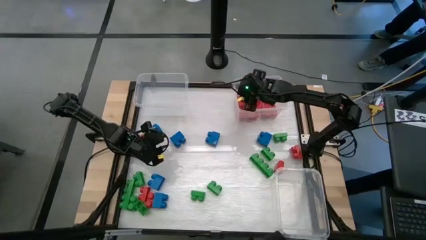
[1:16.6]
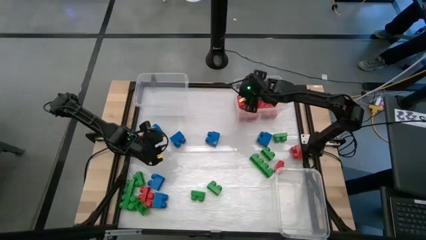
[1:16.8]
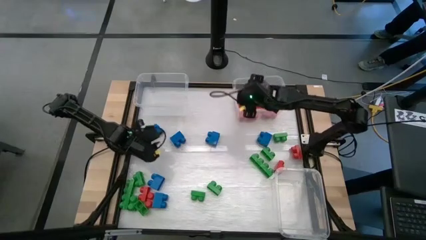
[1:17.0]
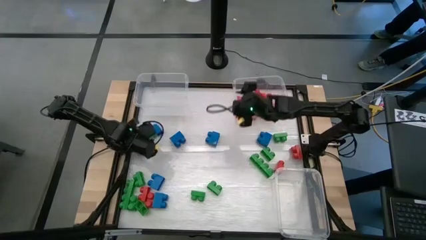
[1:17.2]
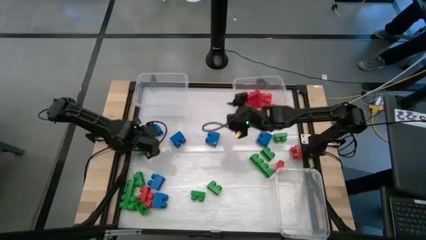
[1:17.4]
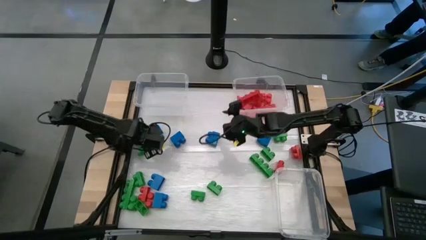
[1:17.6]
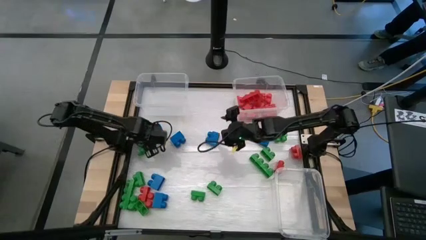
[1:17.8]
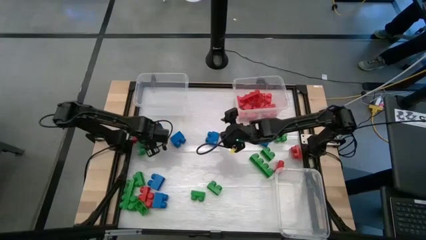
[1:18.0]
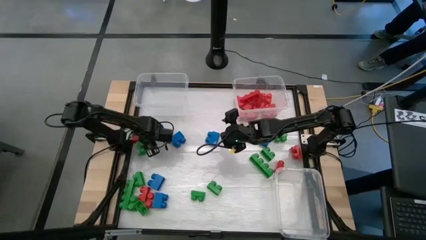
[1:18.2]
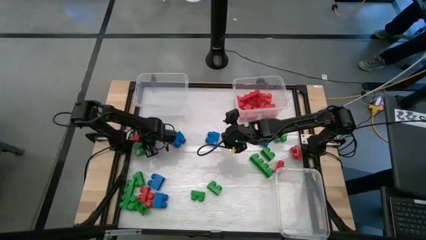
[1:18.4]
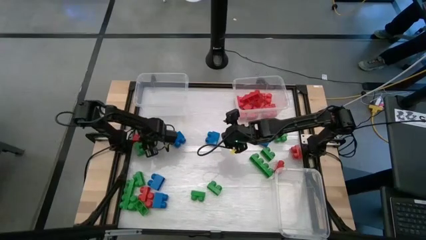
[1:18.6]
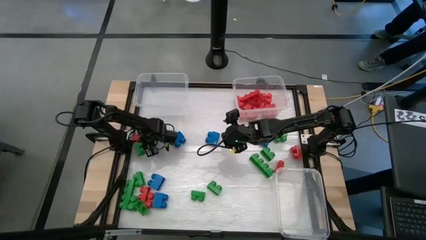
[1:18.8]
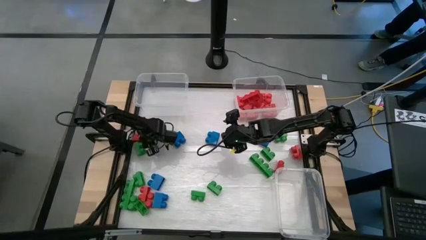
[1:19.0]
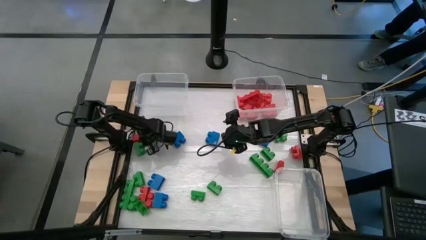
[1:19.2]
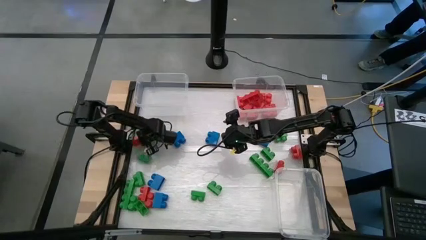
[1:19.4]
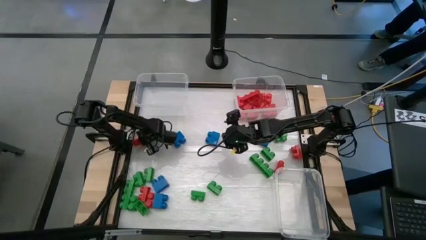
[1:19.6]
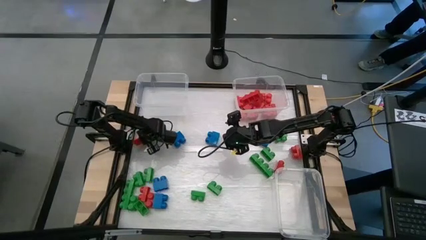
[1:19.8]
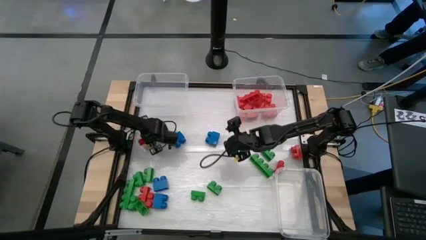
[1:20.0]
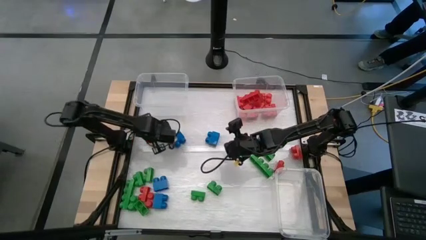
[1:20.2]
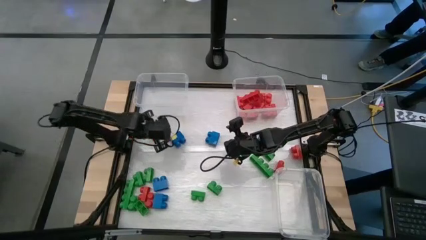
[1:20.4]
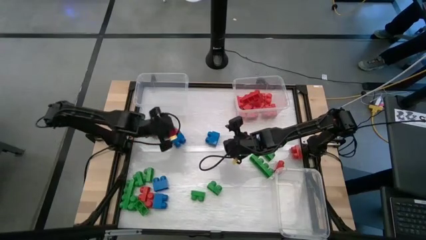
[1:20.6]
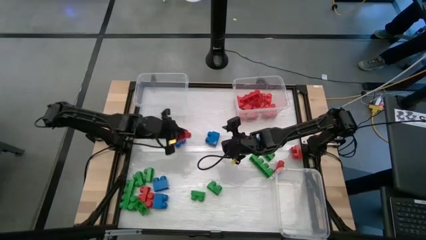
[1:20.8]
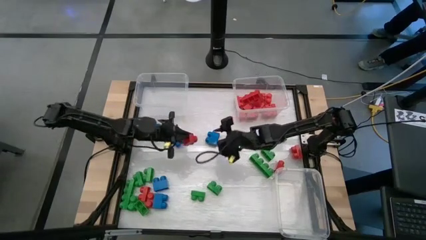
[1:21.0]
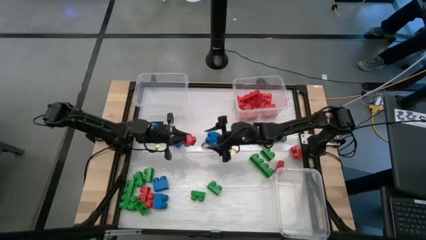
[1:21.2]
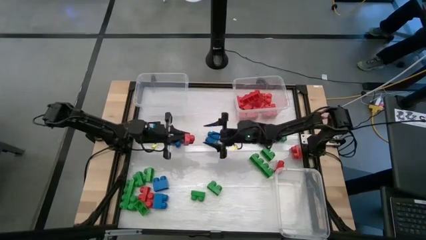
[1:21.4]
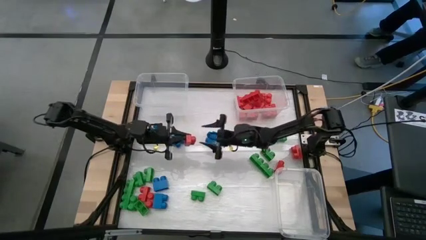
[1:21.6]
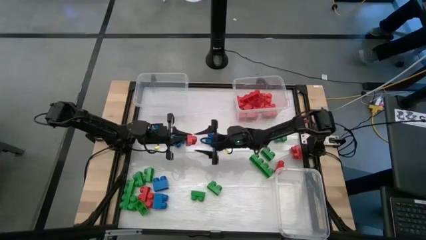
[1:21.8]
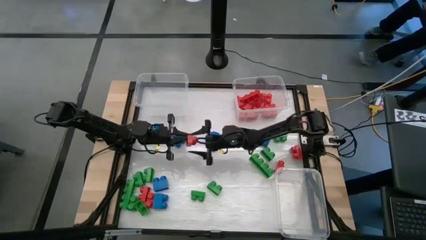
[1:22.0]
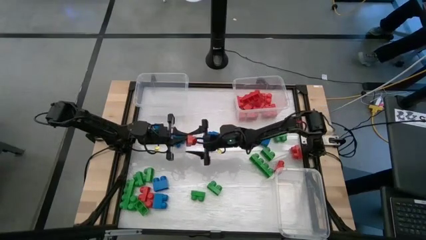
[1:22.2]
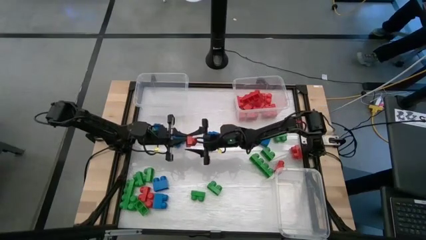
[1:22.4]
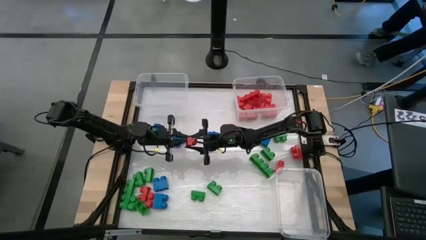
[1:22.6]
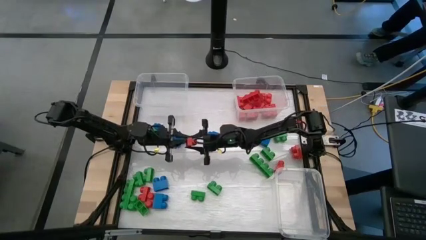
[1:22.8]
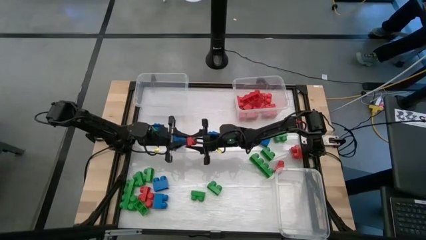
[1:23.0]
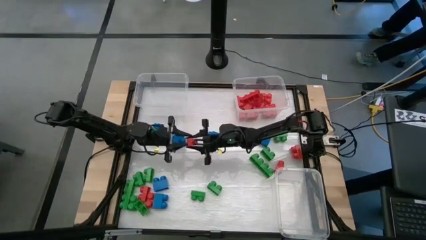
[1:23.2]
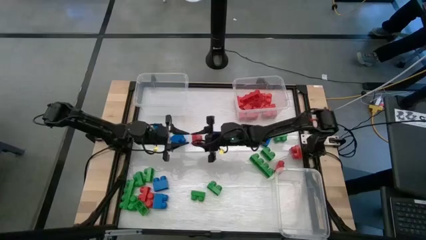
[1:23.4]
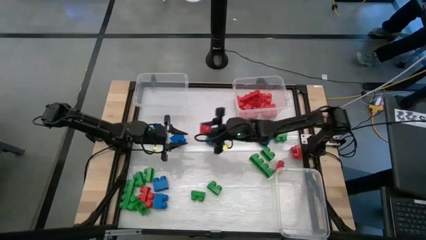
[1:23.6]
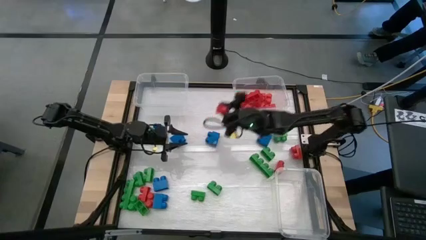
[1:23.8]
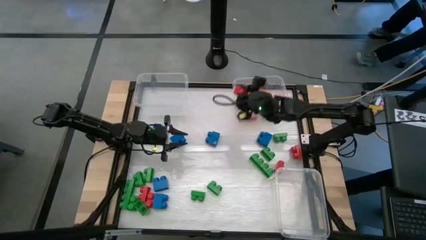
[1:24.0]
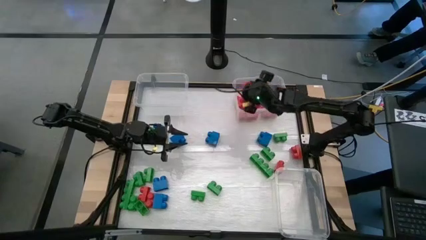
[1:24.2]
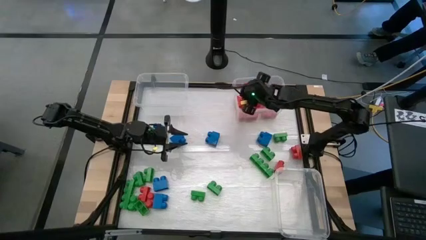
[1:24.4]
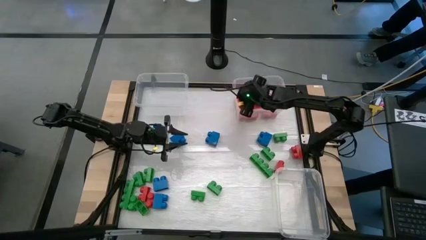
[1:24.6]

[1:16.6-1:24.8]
Task: Sort blocks
Put the red game piece into the top right transparent bin

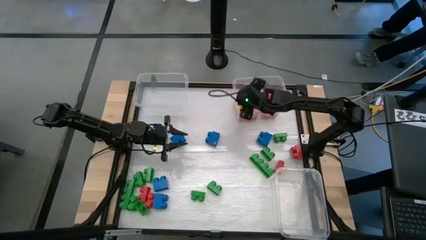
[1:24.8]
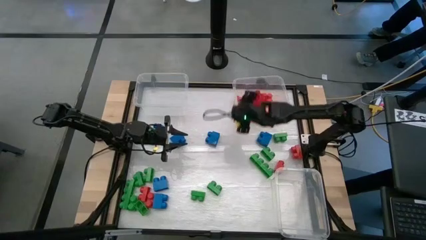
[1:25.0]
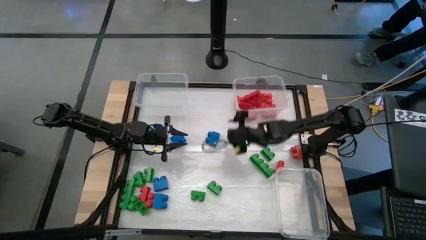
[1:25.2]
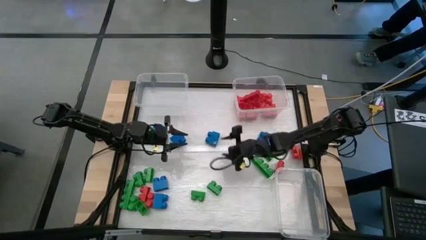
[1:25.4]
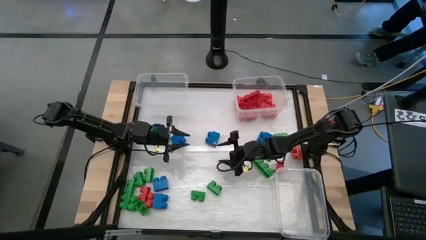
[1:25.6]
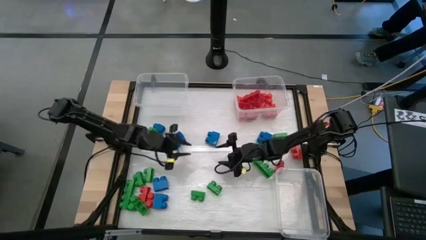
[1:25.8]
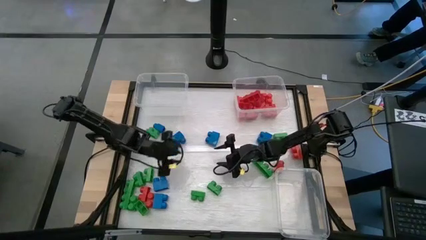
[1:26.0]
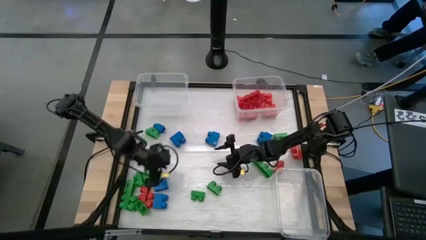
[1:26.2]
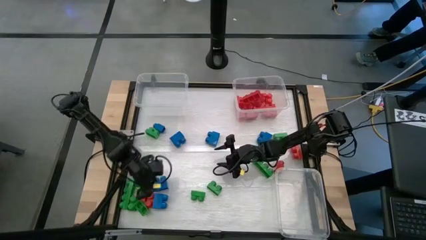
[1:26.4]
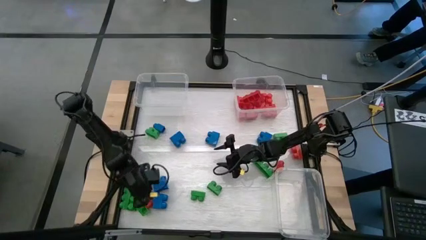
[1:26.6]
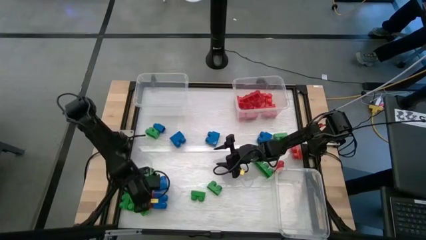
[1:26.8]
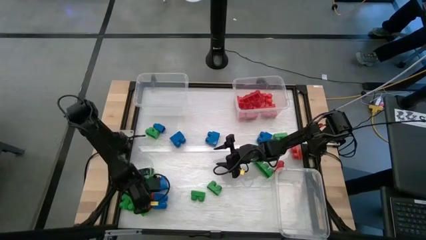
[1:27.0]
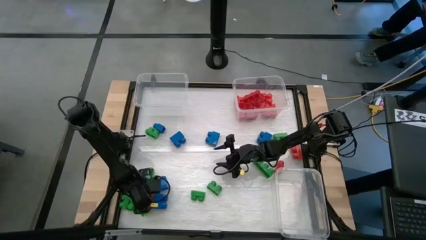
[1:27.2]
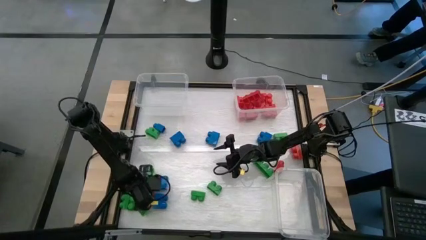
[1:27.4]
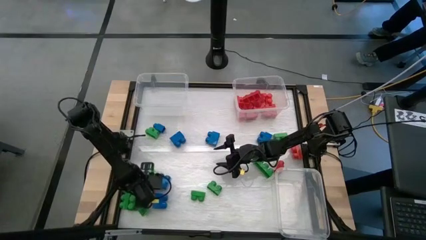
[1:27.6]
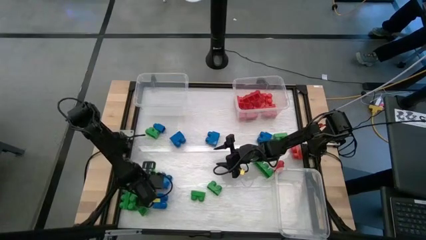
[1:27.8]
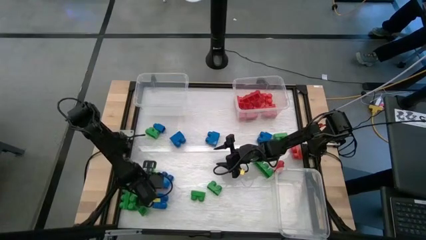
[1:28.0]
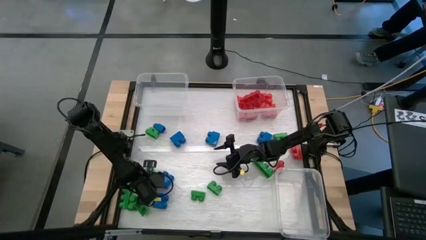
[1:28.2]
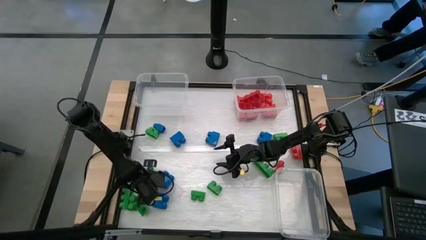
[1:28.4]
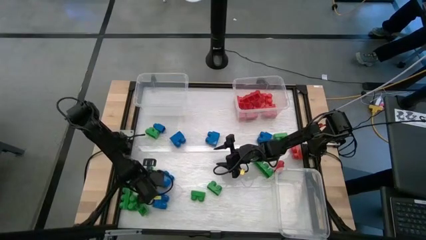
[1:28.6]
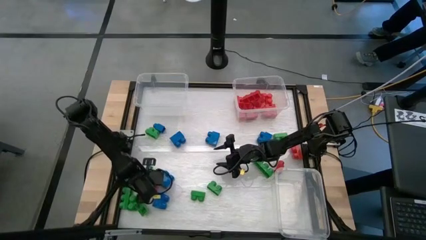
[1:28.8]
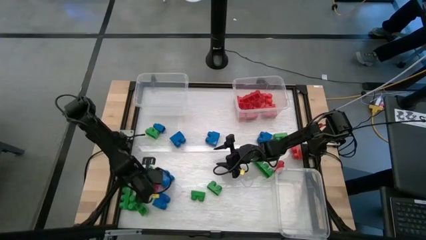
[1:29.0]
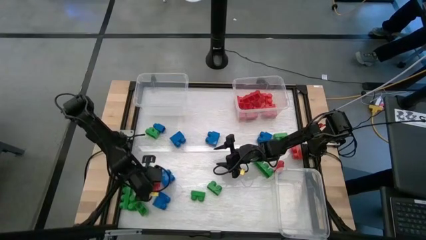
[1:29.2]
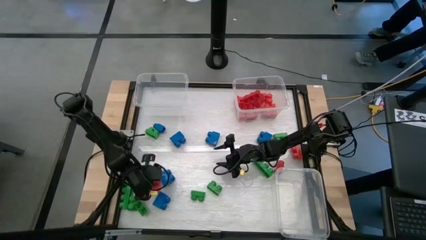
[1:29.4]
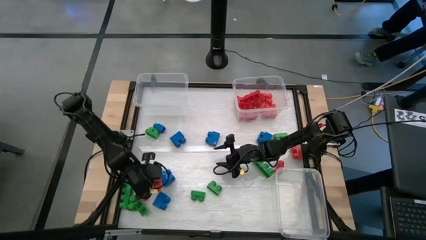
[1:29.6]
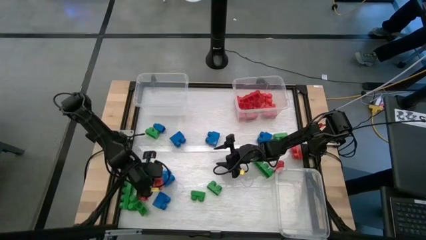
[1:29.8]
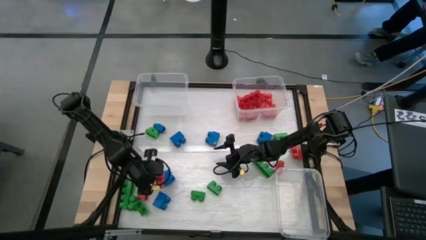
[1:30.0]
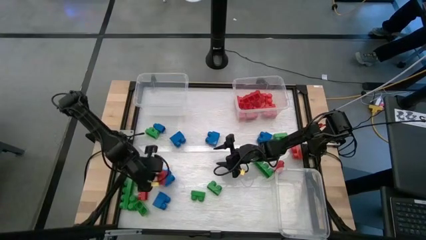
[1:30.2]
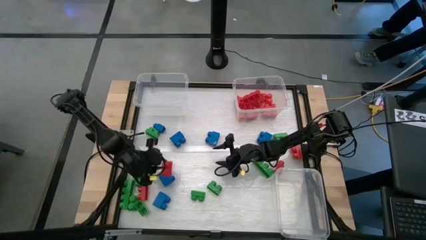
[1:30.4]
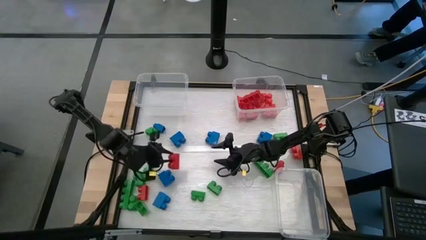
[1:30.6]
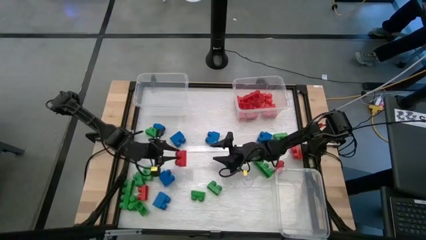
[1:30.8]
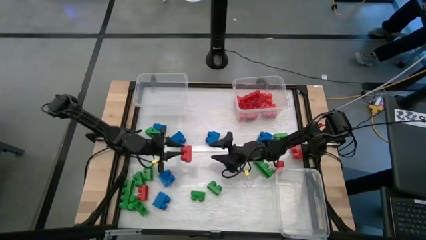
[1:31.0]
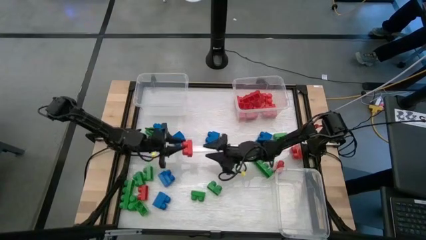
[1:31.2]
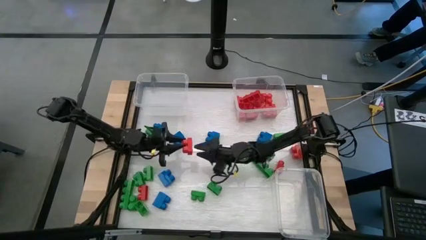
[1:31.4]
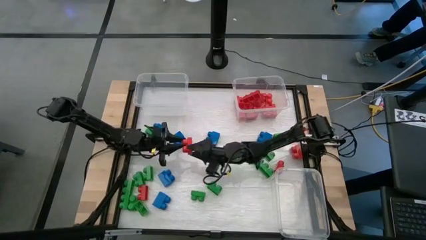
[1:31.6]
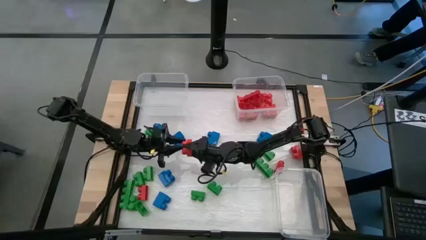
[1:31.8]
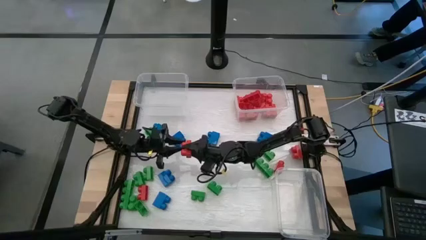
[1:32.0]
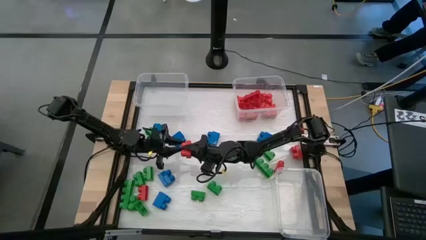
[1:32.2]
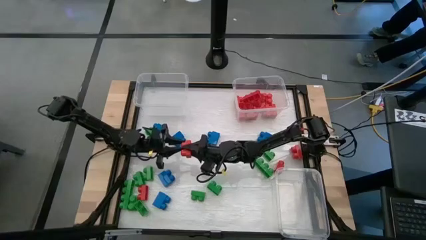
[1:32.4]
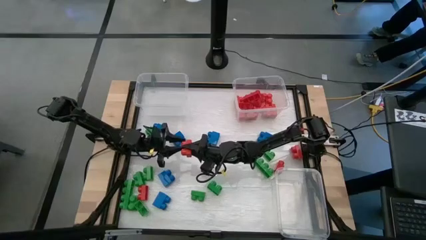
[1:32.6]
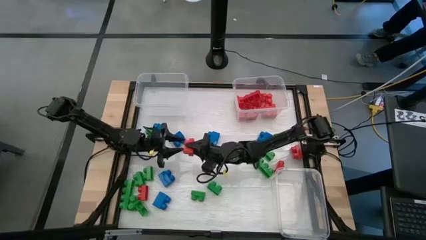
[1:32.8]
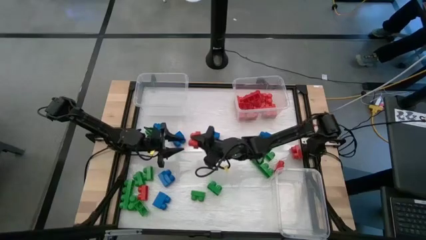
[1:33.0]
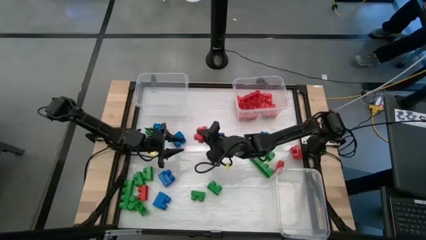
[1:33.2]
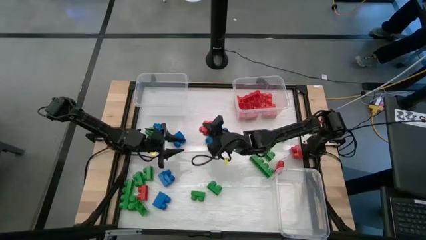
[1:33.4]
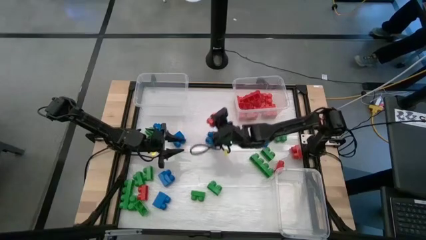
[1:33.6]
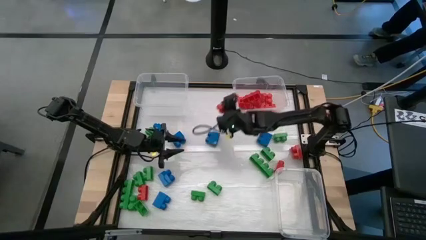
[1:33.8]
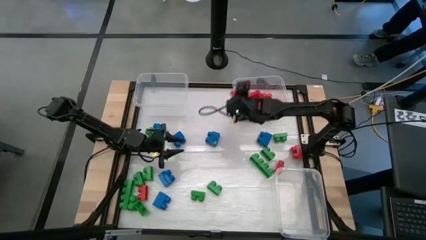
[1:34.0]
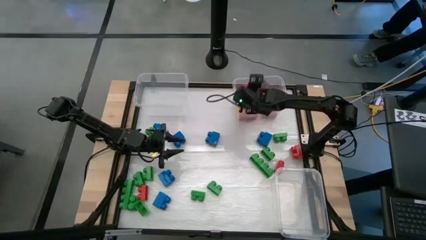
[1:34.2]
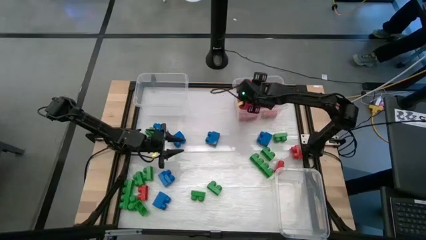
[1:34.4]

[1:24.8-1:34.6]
Put the red game piece into the top right transparent bin
